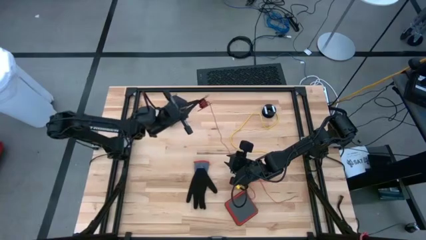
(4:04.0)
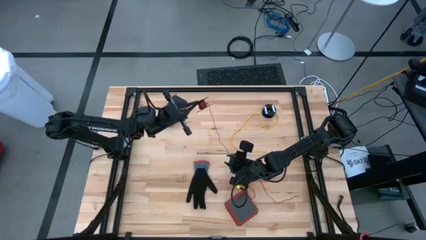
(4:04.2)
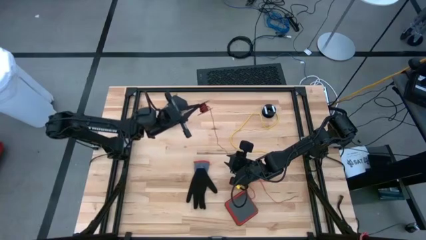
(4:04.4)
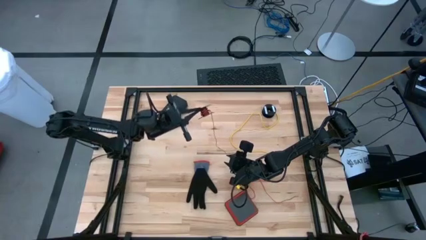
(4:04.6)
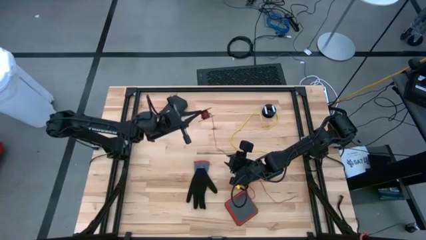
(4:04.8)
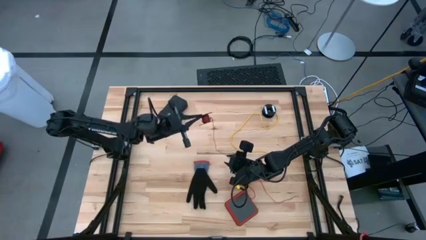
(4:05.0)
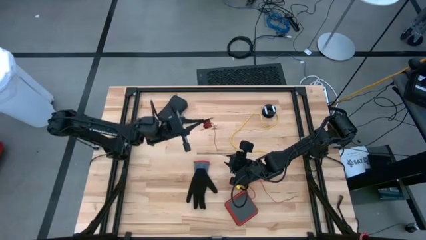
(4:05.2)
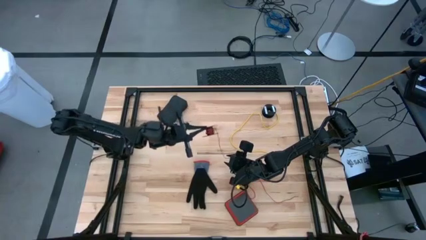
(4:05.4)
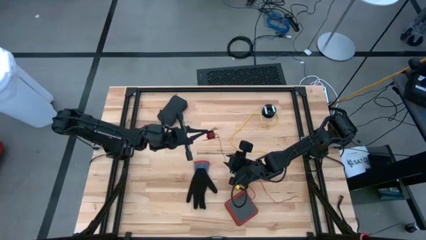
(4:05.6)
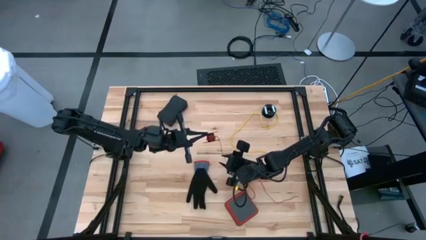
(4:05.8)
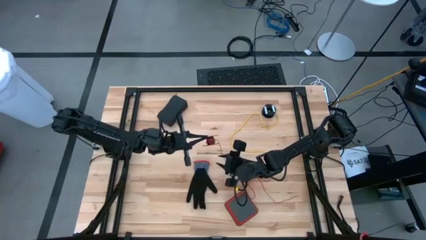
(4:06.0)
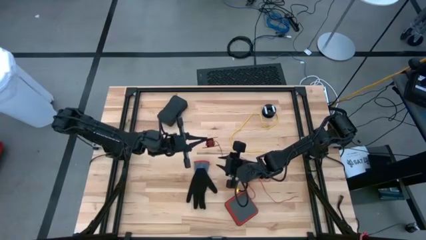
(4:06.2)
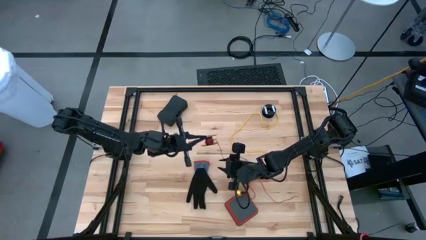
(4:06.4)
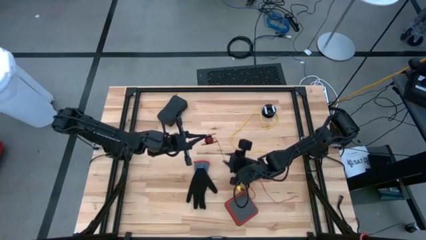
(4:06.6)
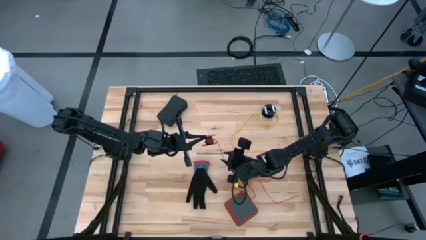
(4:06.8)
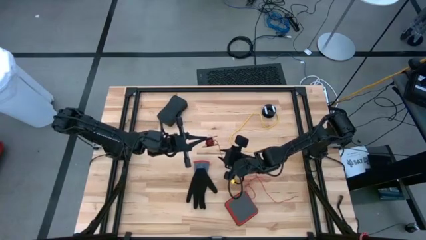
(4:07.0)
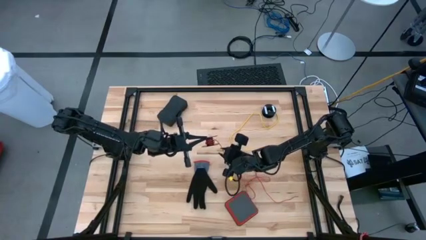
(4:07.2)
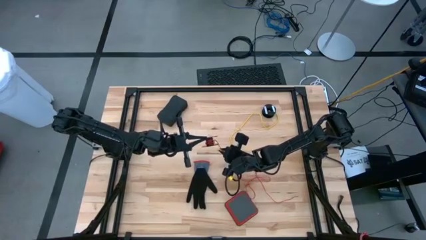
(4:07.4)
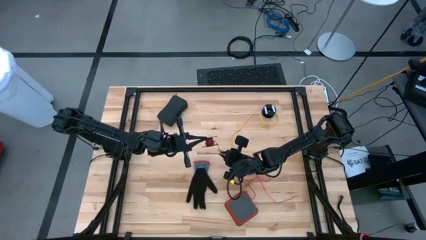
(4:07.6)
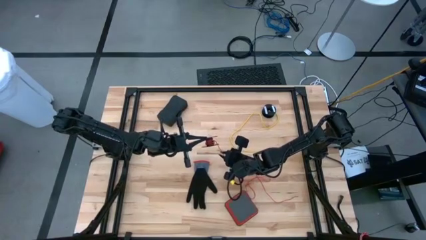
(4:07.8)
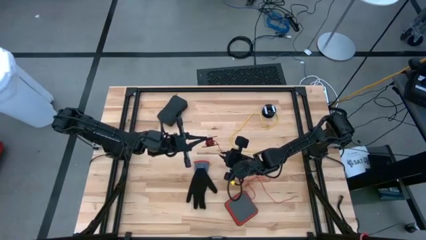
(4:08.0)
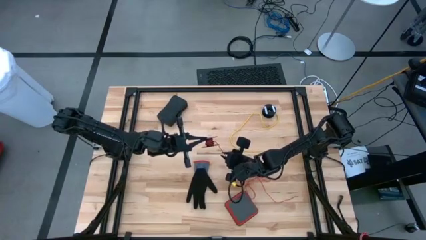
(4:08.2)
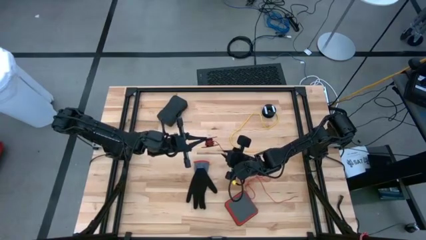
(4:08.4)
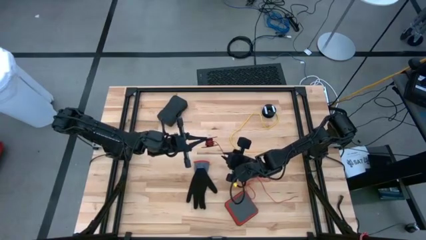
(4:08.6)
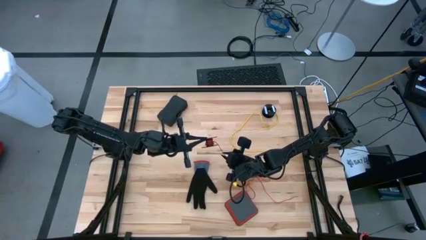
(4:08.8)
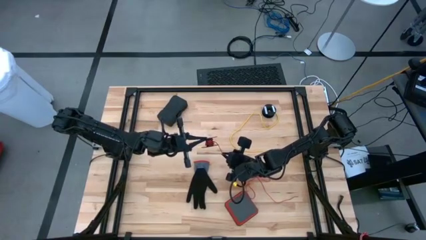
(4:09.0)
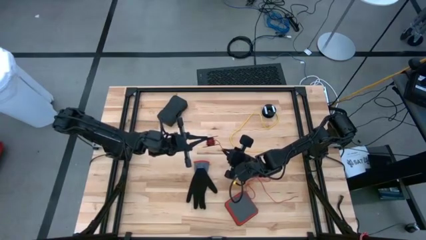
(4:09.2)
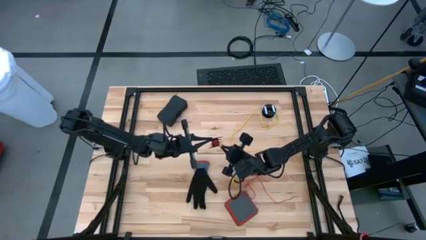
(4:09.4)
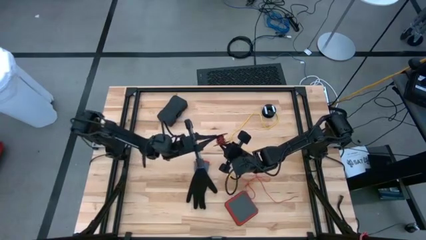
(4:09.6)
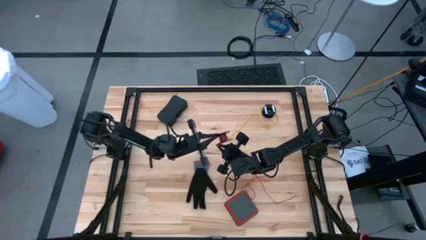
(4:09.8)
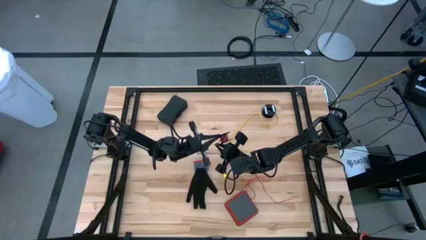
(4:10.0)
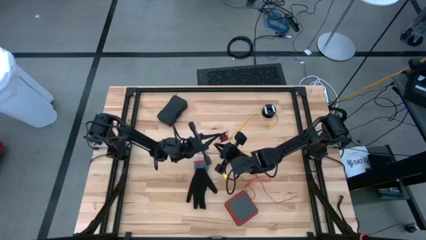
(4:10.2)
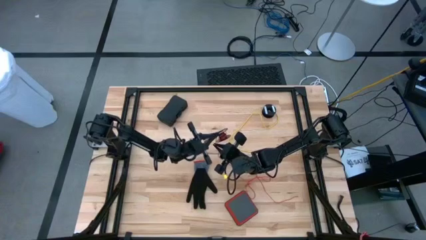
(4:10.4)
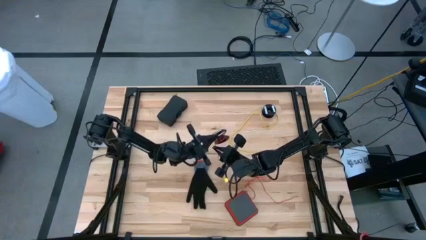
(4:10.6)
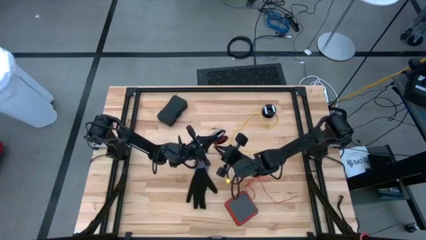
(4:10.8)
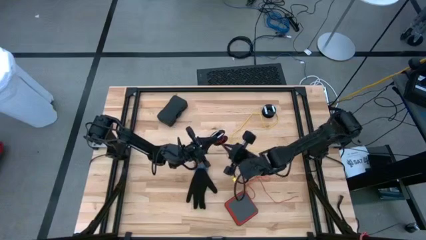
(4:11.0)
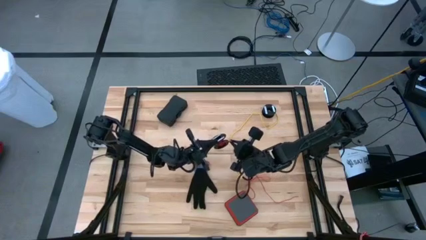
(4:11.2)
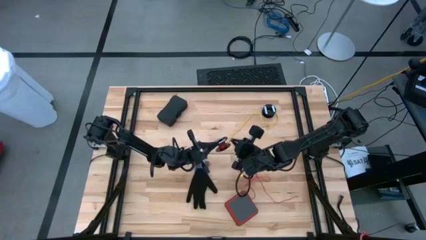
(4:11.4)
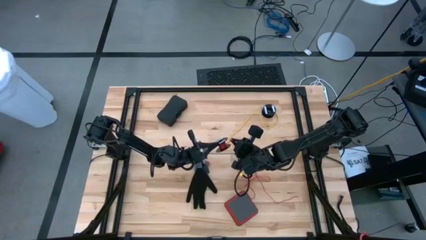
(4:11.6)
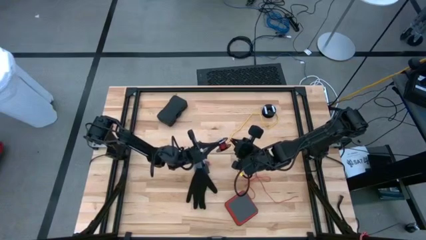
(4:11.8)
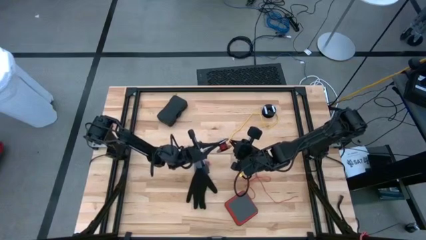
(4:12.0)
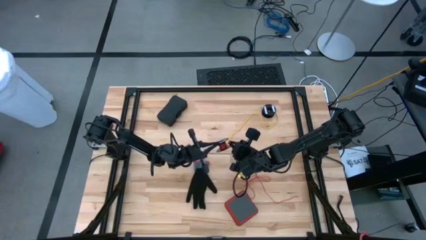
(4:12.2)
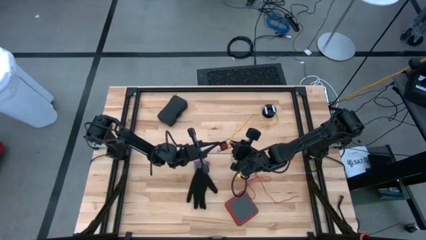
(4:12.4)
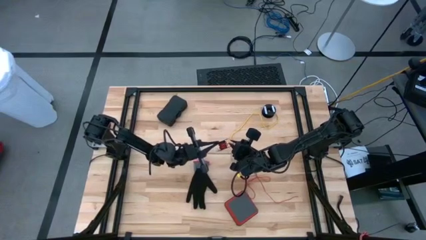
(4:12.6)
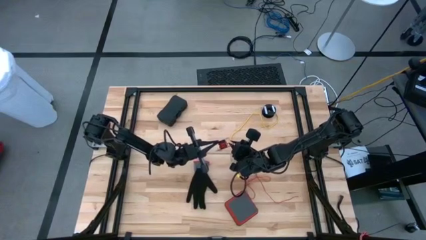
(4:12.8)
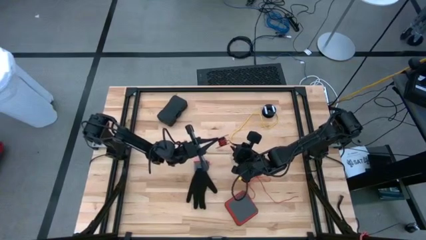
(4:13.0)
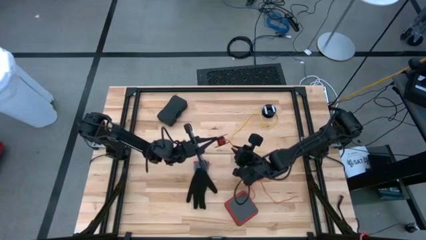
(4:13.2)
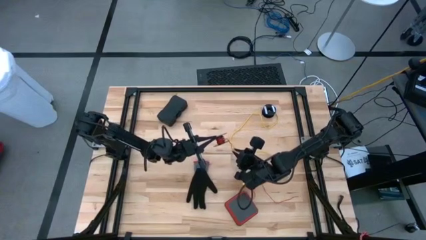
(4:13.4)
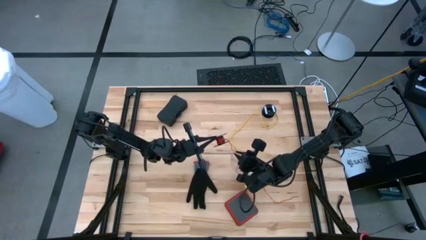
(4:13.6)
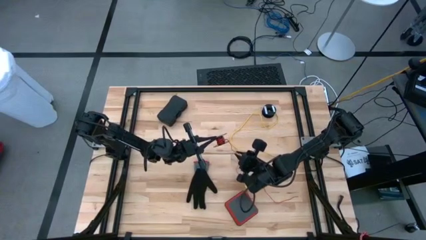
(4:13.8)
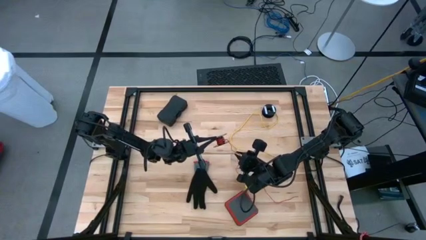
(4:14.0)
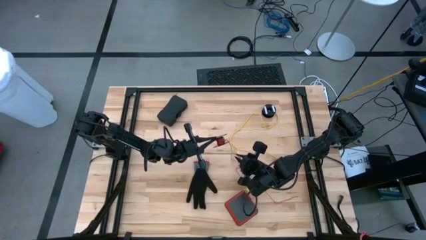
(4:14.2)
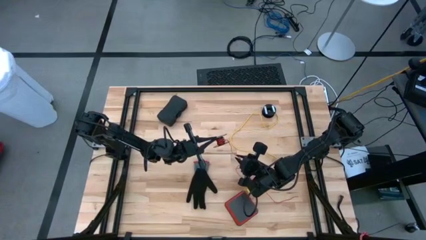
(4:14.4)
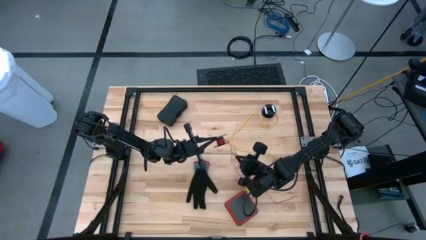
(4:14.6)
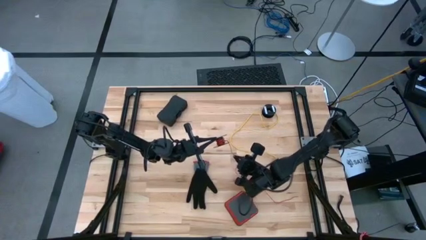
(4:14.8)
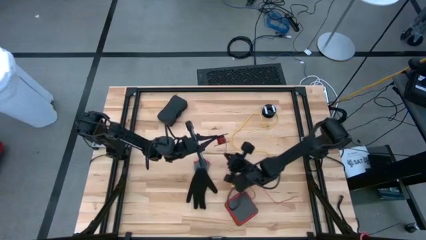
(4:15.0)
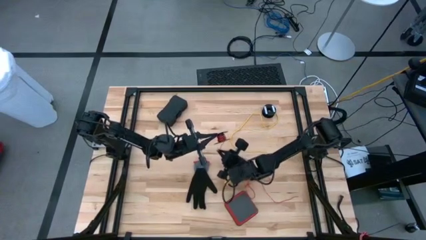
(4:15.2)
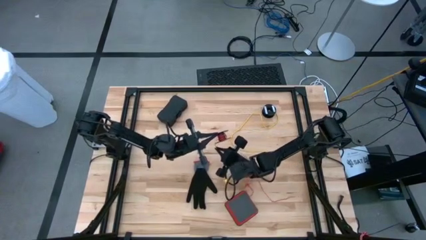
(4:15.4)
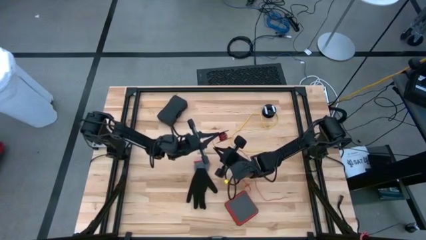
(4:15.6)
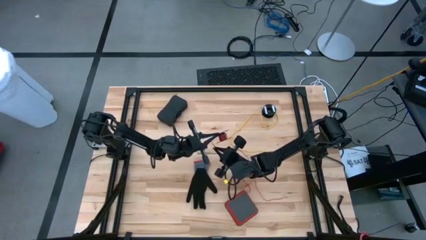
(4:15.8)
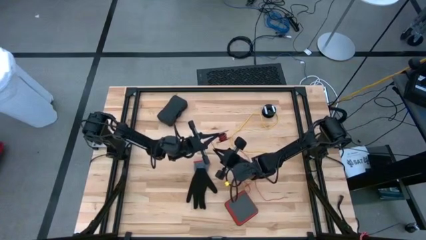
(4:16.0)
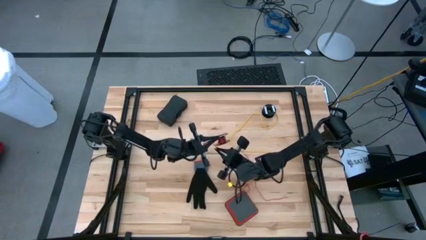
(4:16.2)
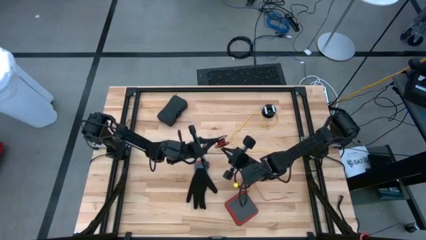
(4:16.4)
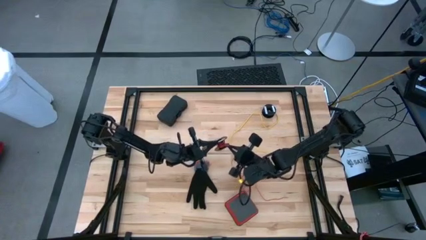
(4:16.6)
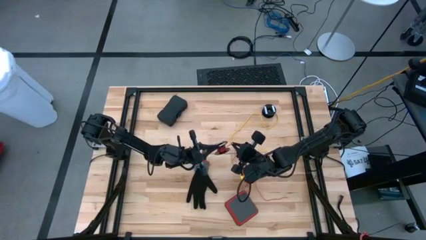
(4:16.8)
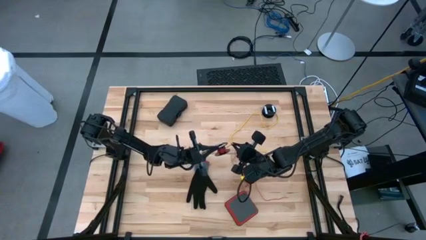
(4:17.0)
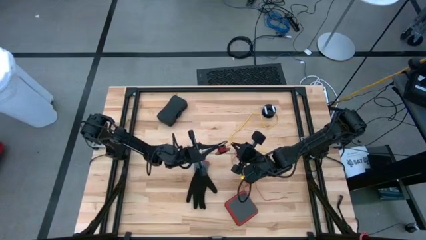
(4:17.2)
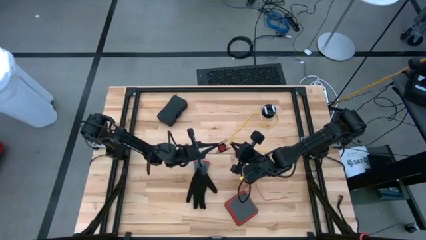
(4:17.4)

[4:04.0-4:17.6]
Task: Coil cords
Coil the red wire onto the black spool

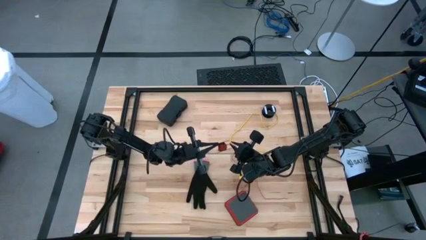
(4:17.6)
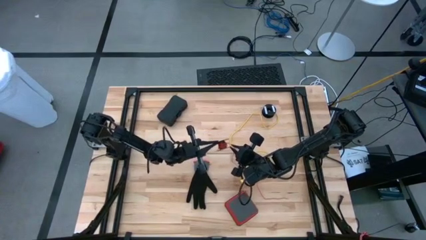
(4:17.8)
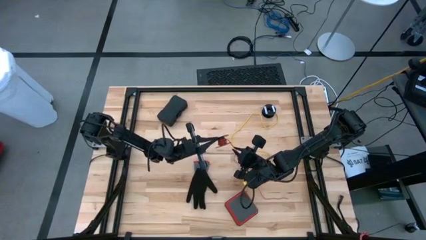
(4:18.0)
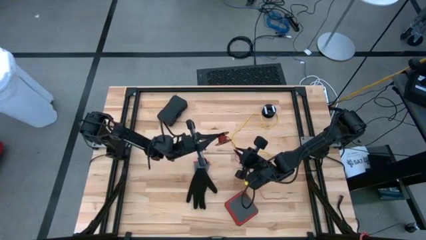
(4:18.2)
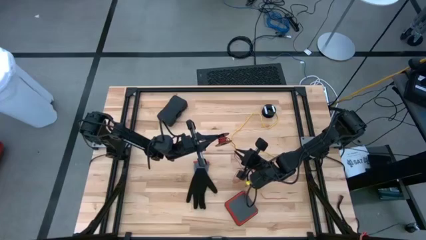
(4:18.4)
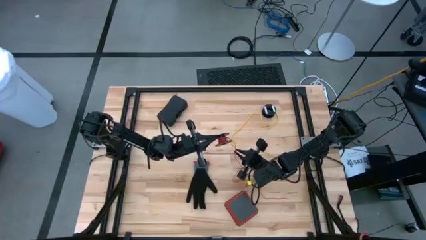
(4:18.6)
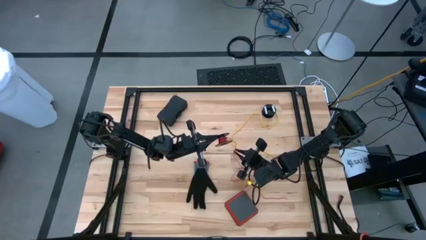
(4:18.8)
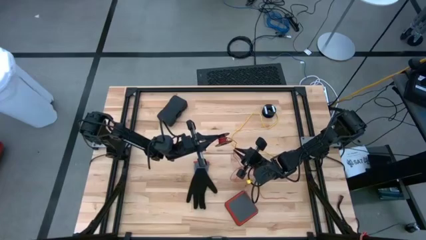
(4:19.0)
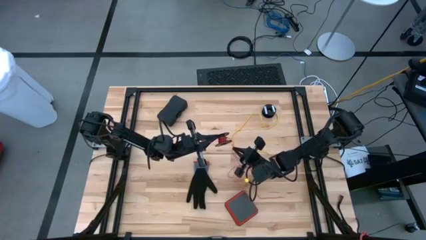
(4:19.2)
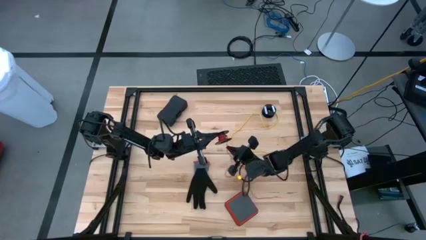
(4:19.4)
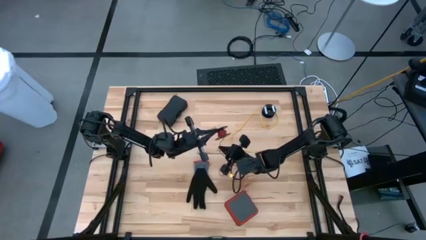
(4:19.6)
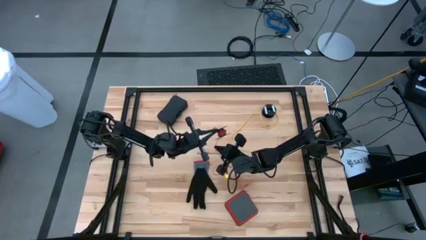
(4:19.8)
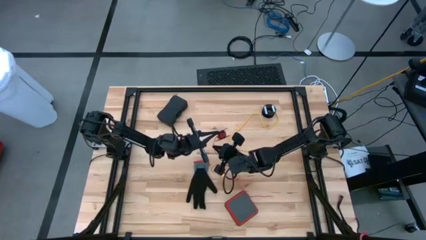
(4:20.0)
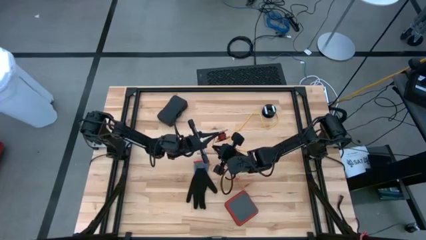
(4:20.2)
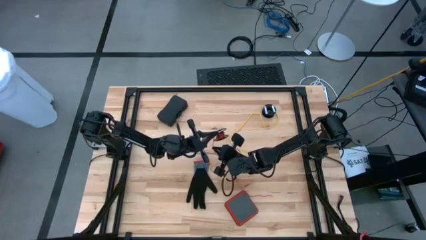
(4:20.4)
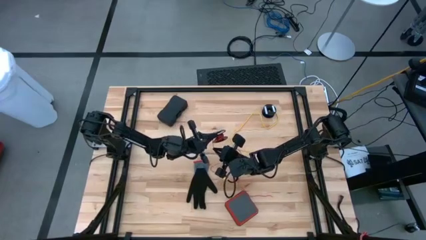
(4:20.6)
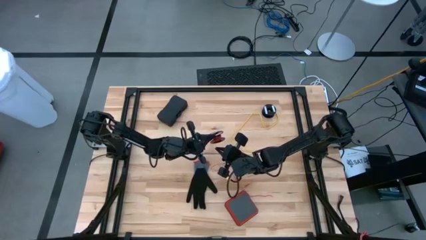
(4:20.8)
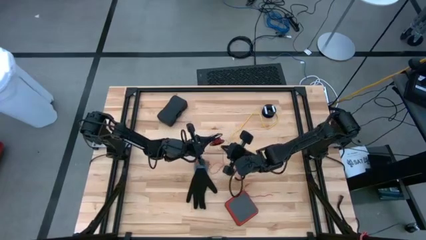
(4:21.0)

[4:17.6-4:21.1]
Coil the red wire onto the black spool
